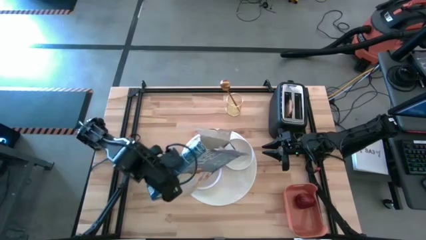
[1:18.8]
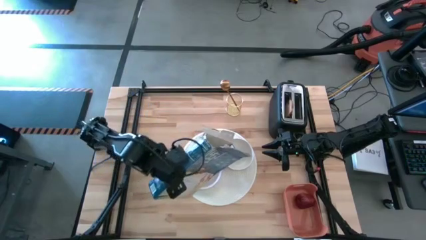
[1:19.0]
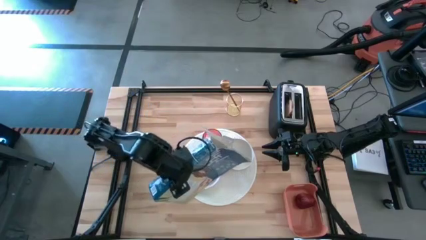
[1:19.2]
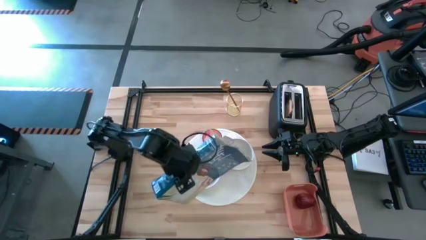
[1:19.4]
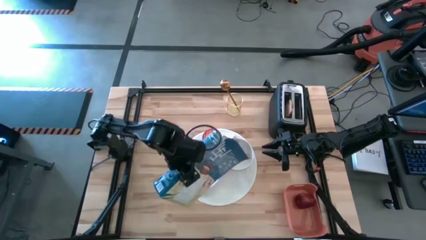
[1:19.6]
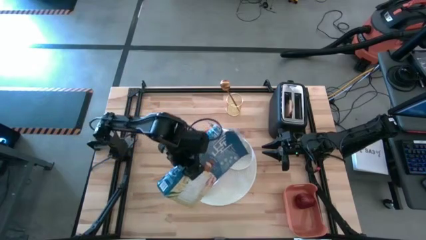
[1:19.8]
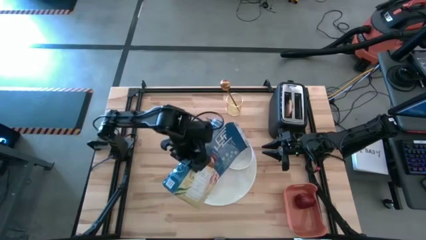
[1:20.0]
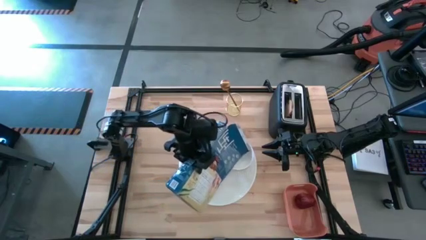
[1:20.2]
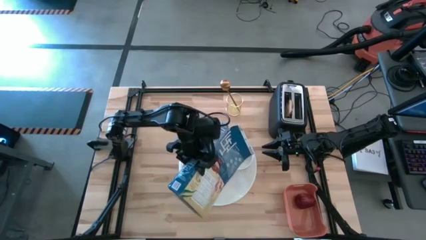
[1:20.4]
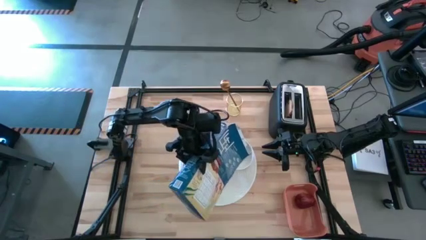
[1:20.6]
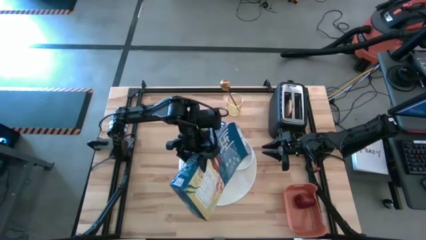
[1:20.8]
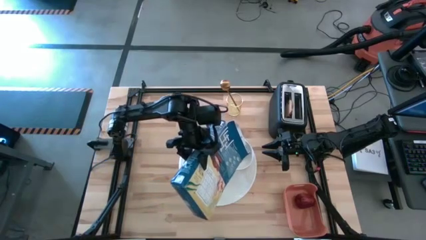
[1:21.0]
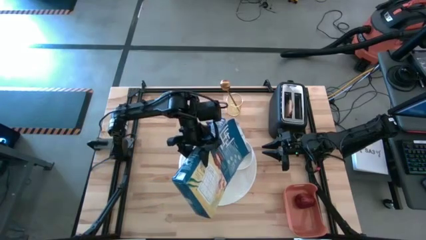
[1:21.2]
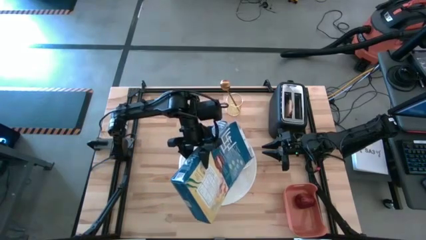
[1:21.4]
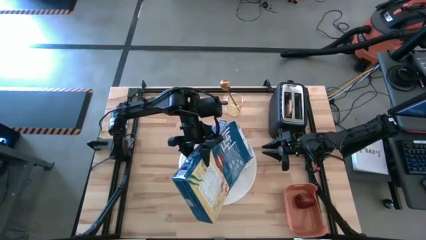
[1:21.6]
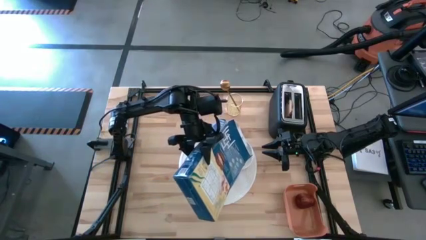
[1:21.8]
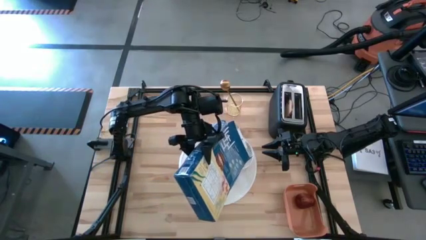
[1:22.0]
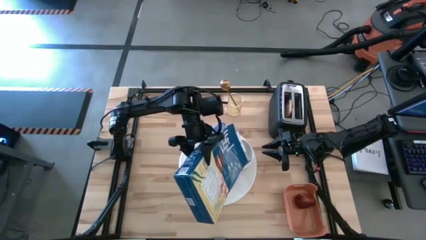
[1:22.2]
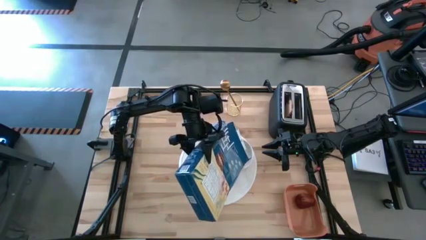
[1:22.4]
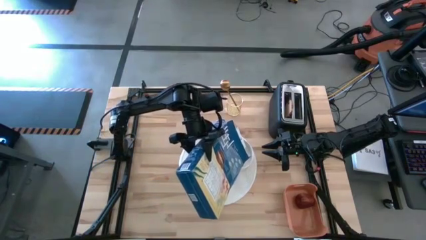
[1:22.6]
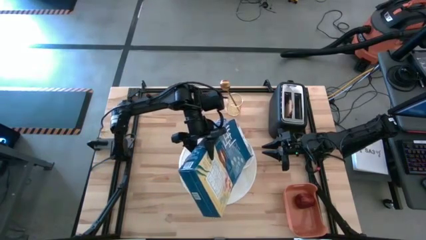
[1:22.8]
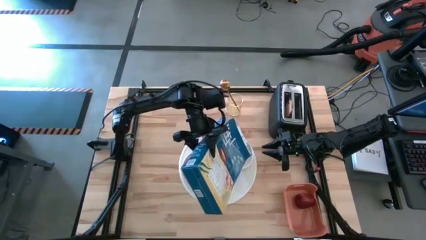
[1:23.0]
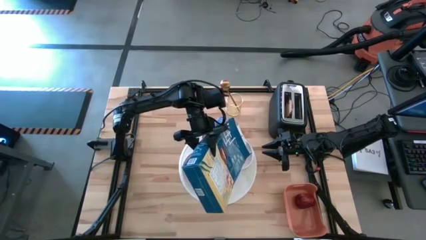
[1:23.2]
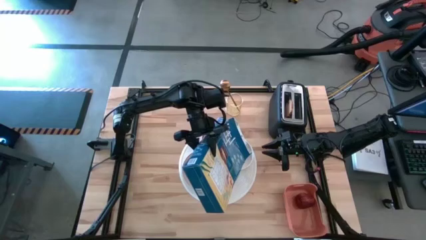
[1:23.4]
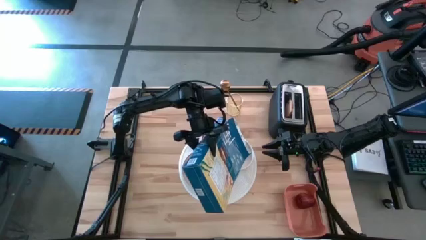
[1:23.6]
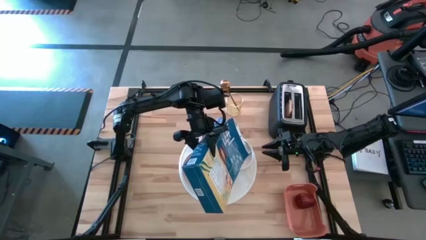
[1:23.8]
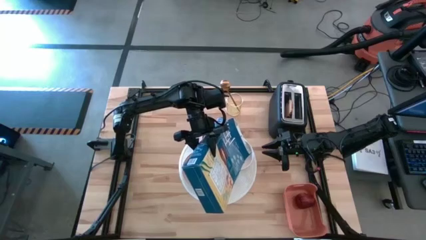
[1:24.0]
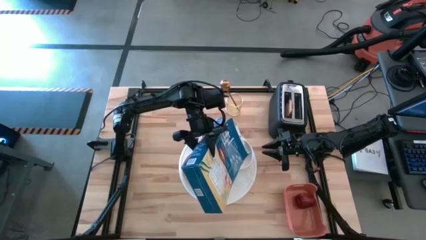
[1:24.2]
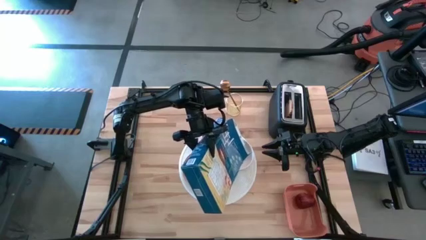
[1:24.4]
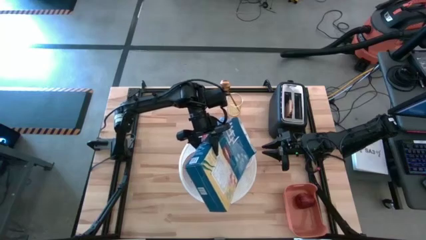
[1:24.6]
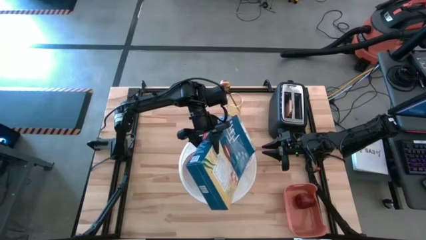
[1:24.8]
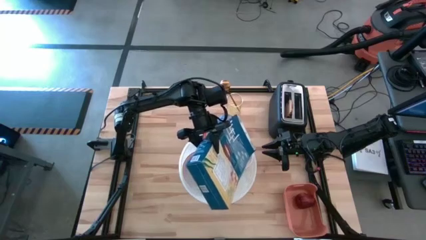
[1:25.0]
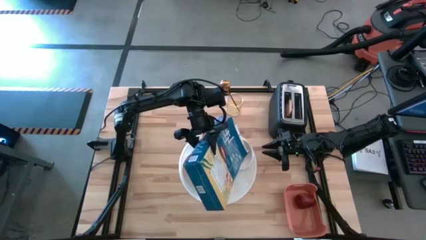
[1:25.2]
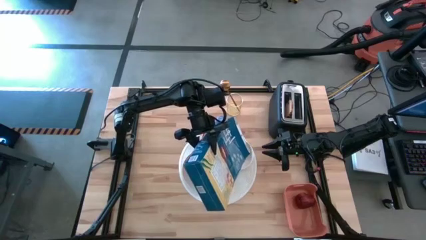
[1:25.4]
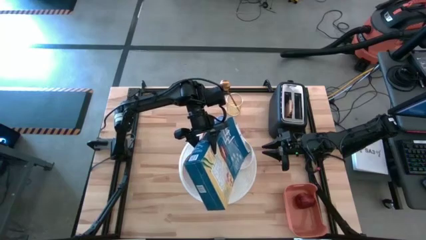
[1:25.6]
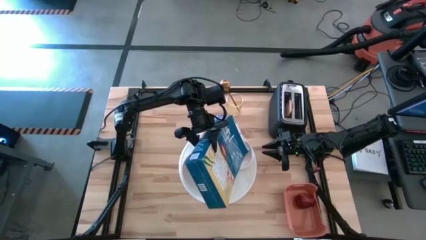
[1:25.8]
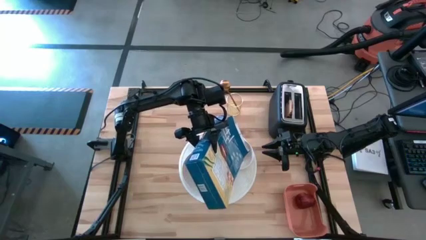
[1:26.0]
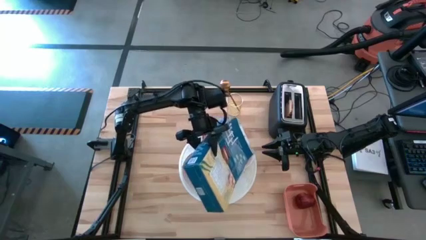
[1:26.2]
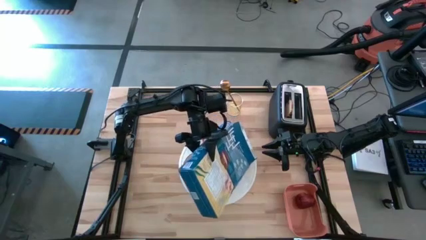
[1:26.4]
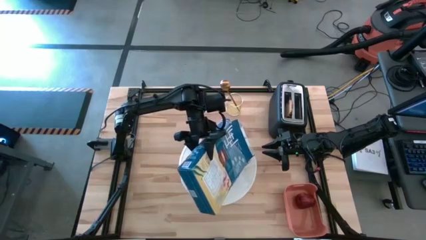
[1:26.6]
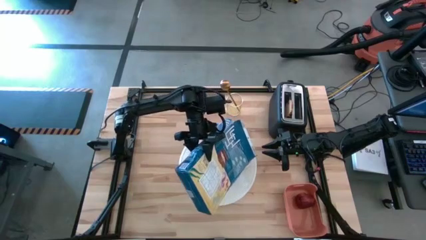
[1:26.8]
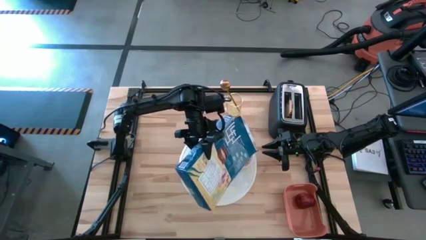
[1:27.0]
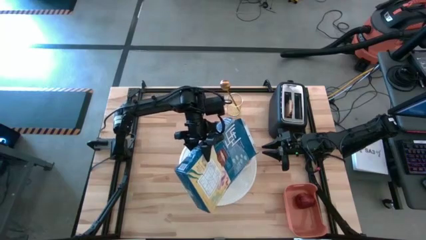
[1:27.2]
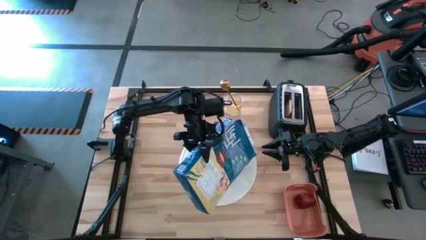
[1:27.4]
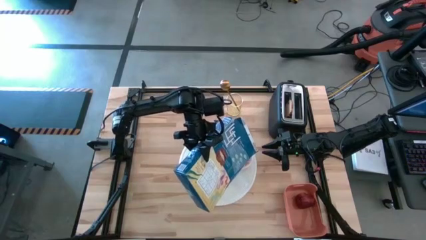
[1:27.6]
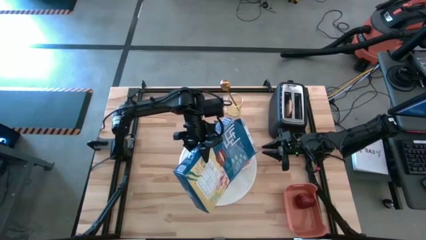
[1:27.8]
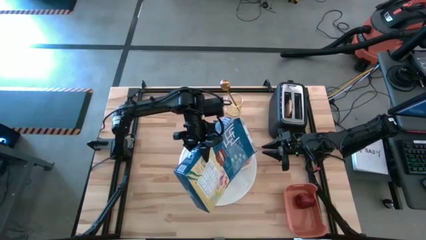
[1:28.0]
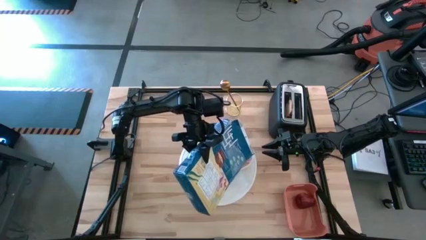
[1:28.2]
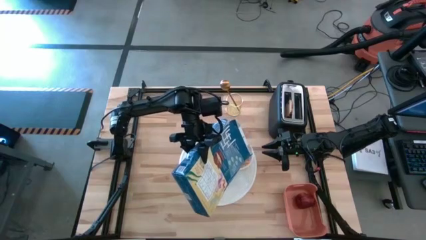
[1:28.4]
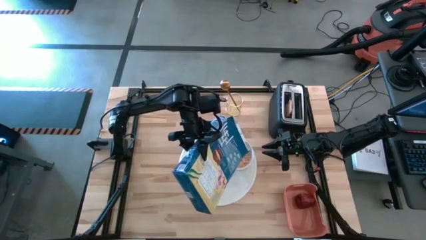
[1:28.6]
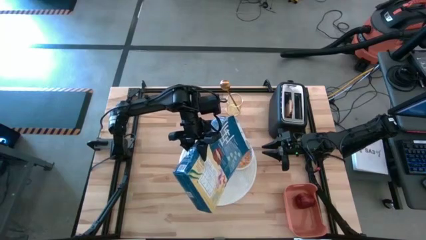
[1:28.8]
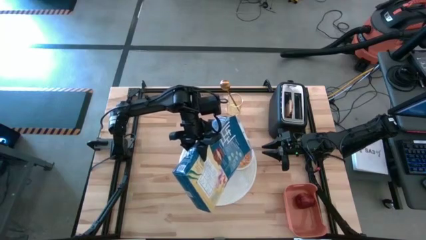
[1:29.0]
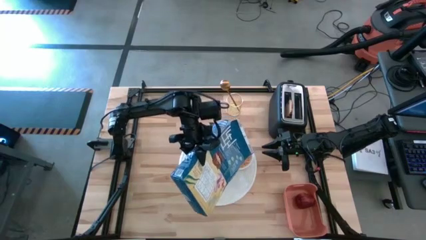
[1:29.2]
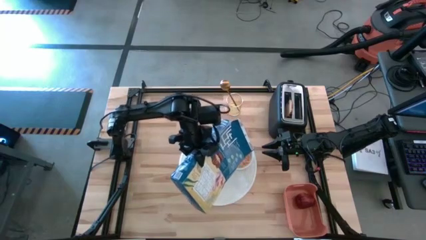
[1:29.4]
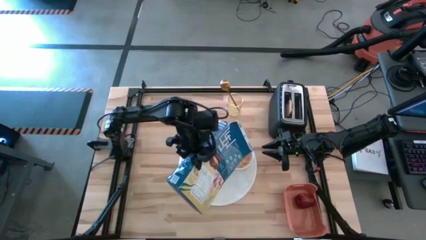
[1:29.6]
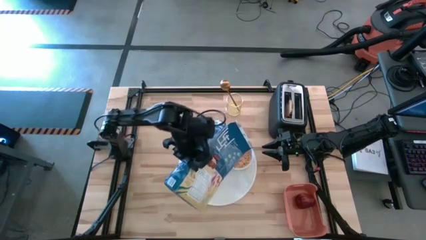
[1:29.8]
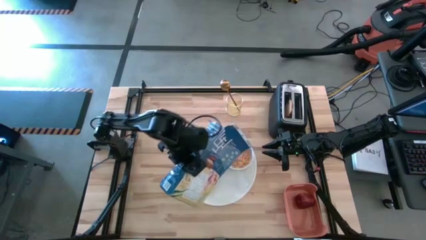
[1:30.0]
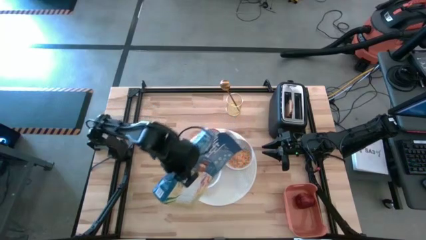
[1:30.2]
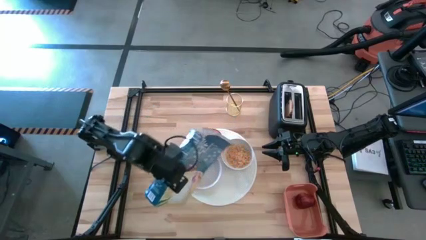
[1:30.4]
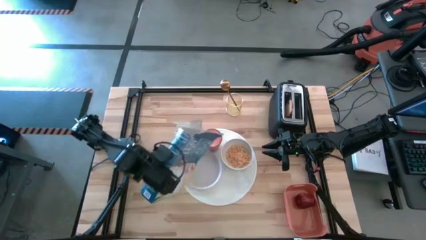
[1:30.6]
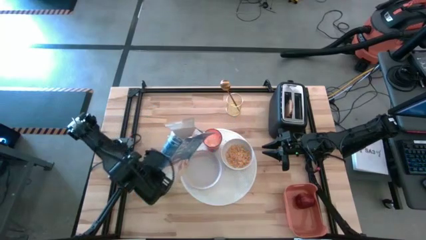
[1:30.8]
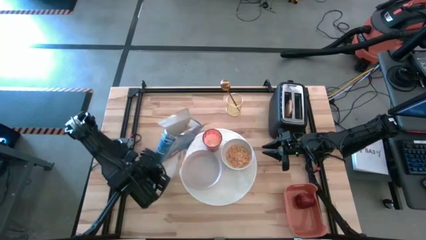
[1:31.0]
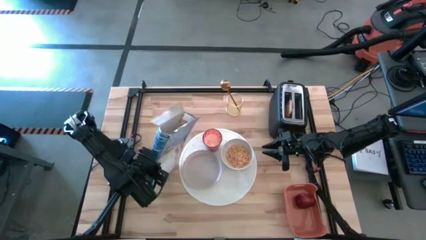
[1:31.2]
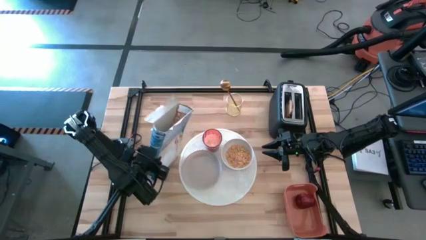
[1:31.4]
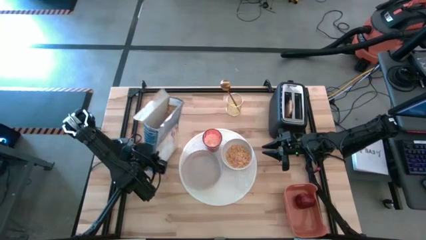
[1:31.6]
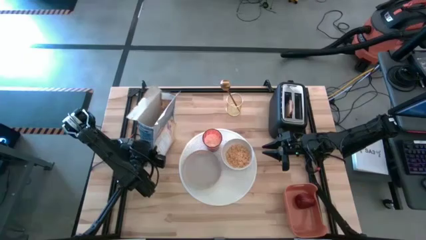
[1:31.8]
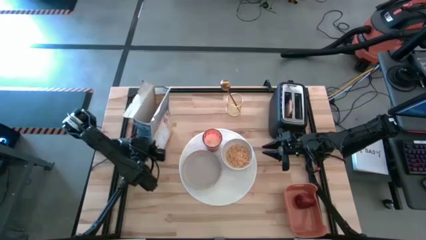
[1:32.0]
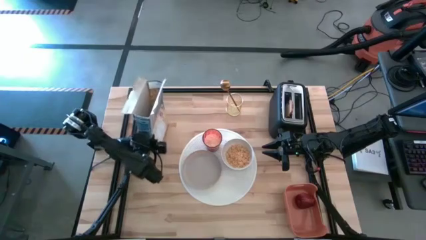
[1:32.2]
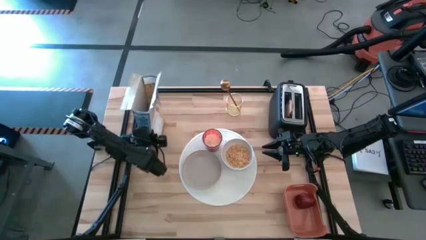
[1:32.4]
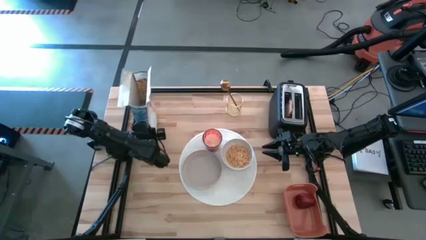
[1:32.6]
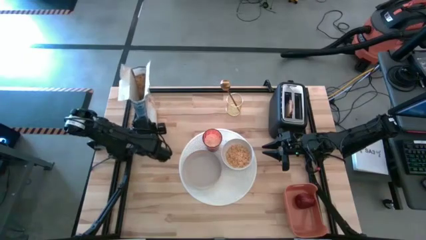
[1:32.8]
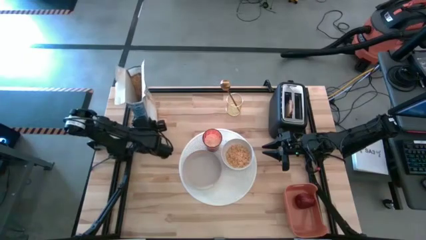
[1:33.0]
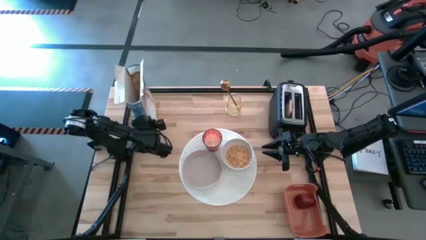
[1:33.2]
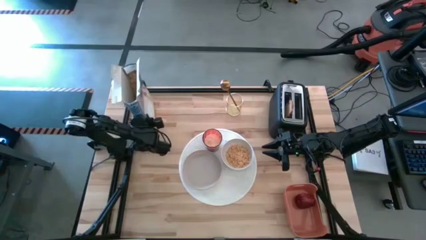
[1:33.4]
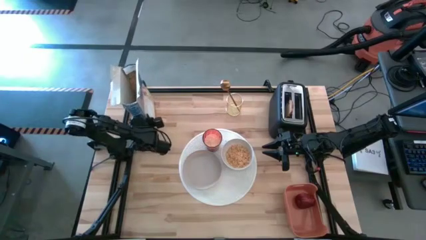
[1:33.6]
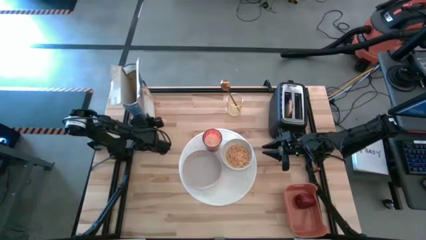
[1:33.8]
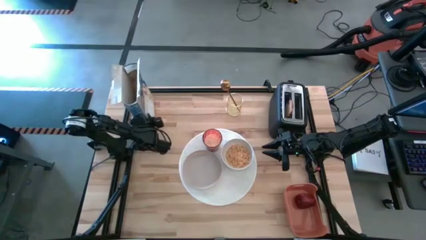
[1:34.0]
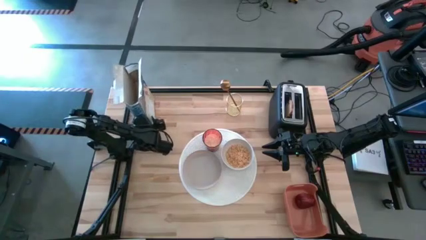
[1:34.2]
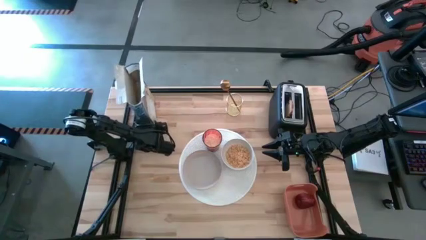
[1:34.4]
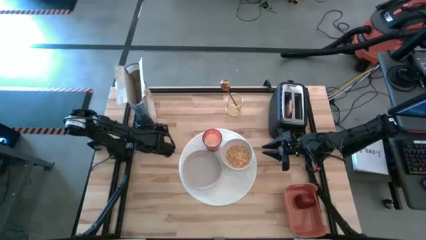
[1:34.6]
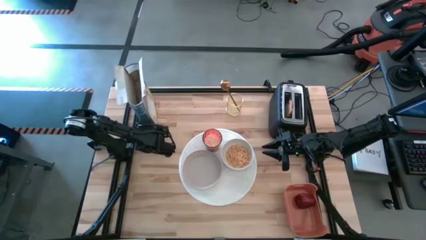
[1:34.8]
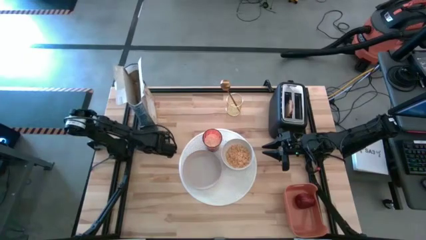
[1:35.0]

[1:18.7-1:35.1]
Task: Arrange a breakfast setting
Pour the cereal from the cereal box into the white bowl
